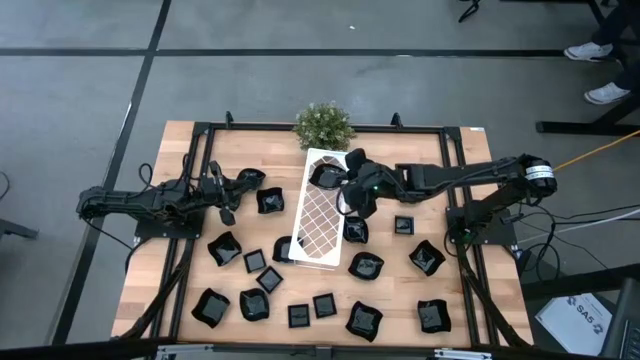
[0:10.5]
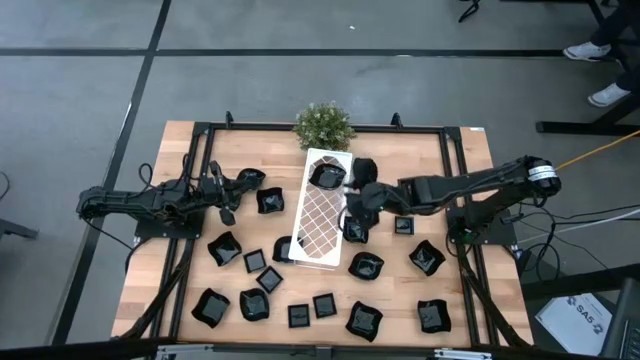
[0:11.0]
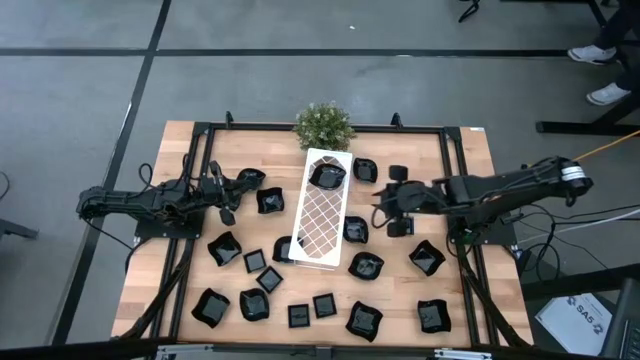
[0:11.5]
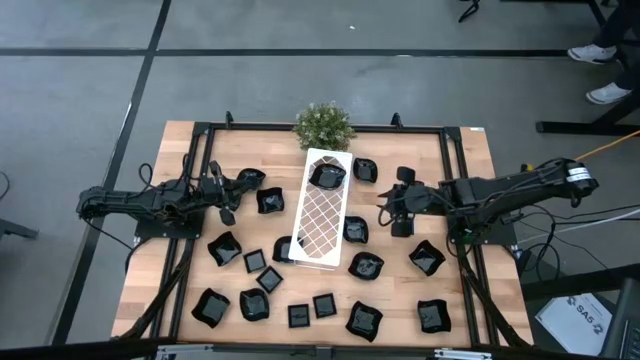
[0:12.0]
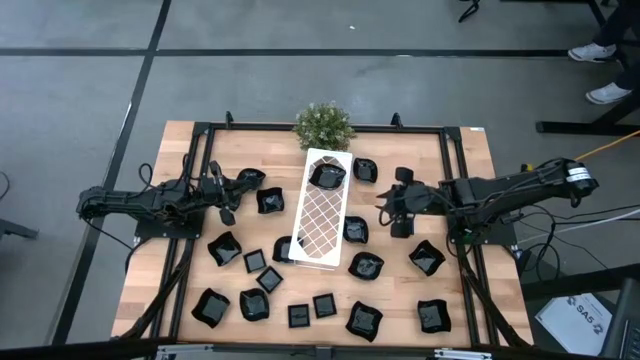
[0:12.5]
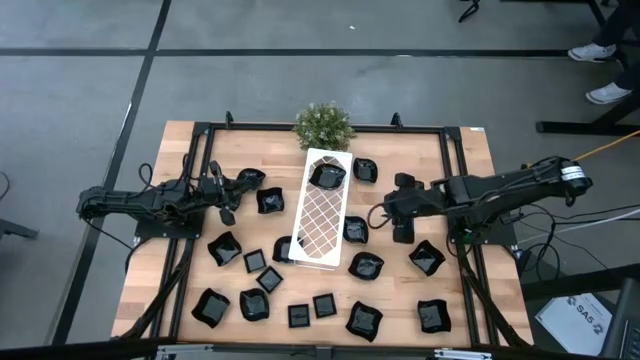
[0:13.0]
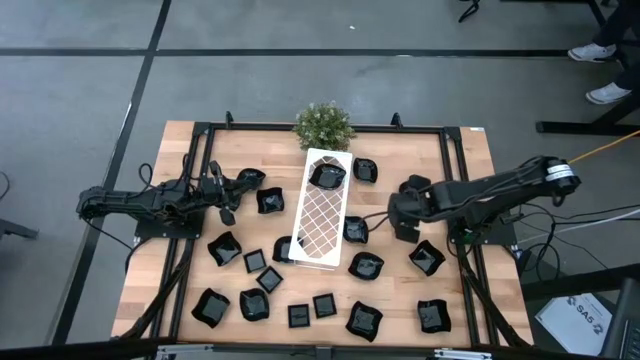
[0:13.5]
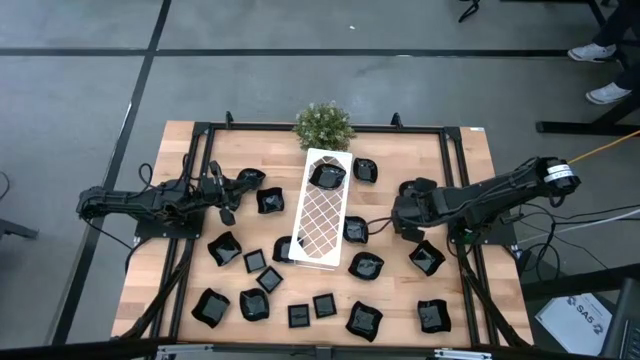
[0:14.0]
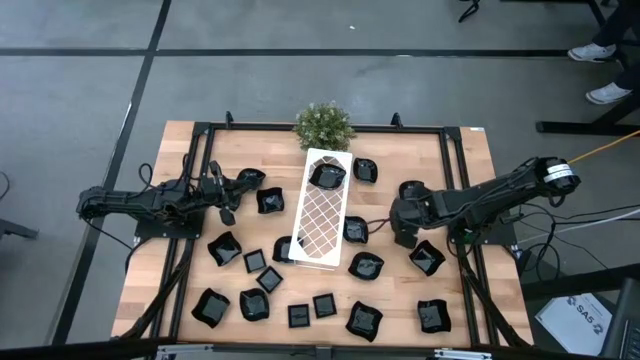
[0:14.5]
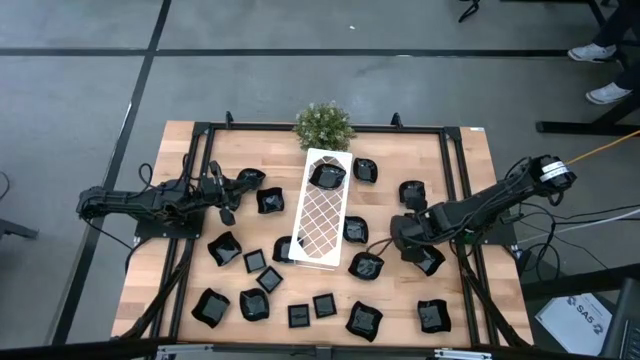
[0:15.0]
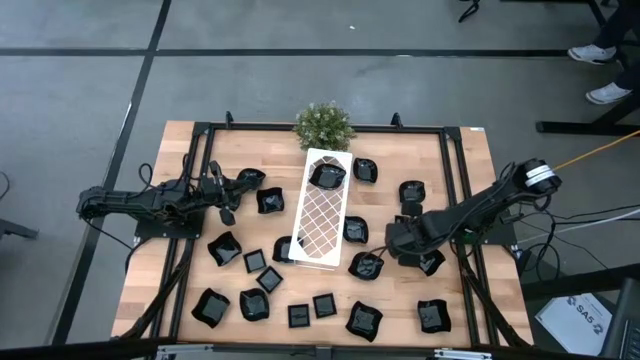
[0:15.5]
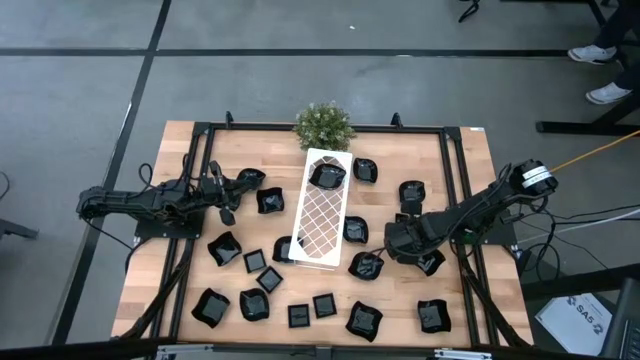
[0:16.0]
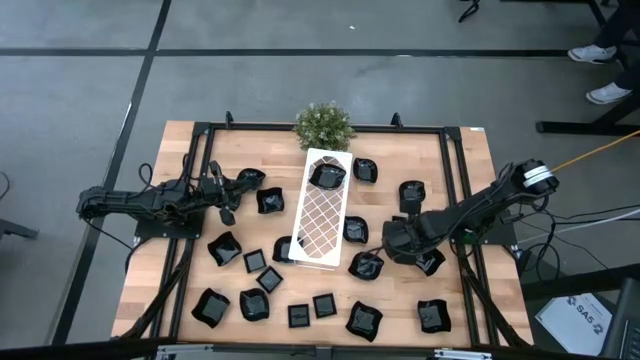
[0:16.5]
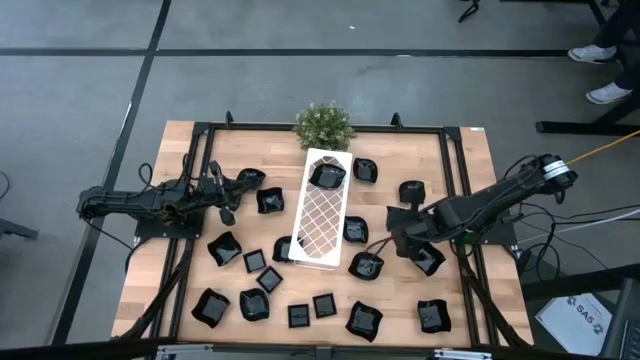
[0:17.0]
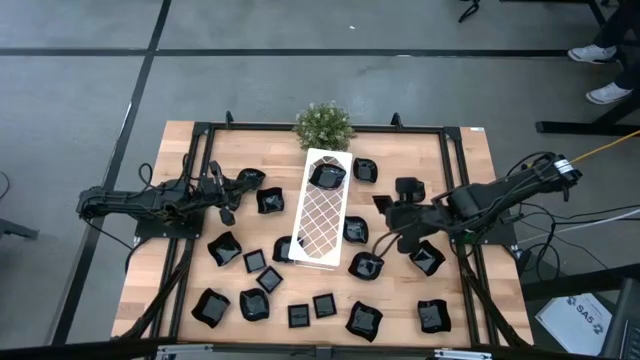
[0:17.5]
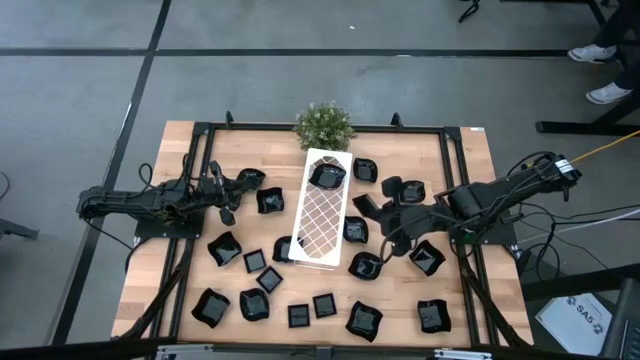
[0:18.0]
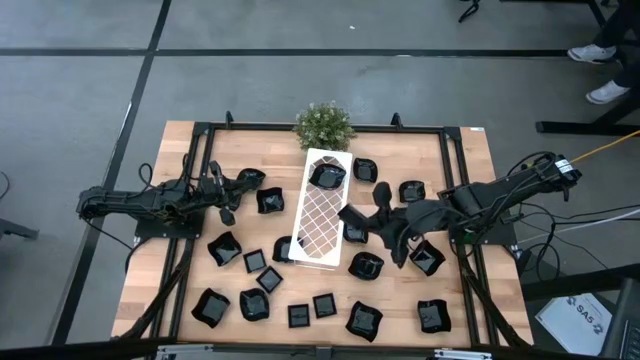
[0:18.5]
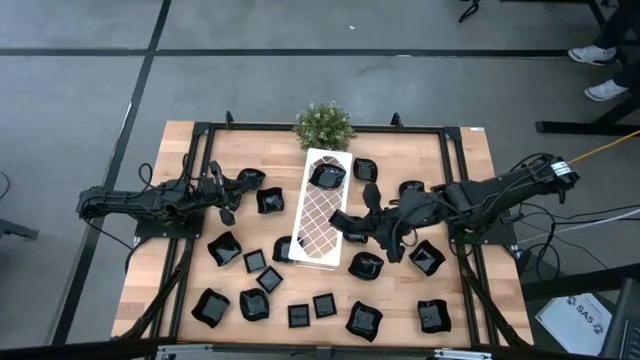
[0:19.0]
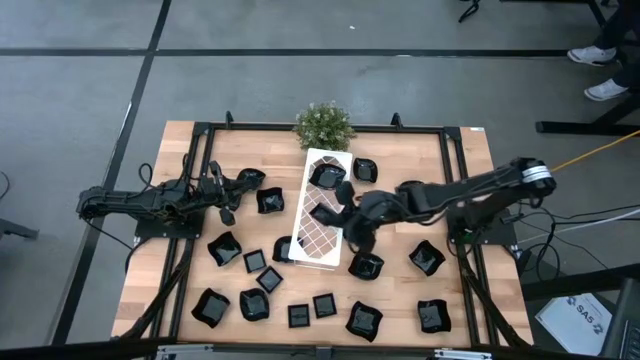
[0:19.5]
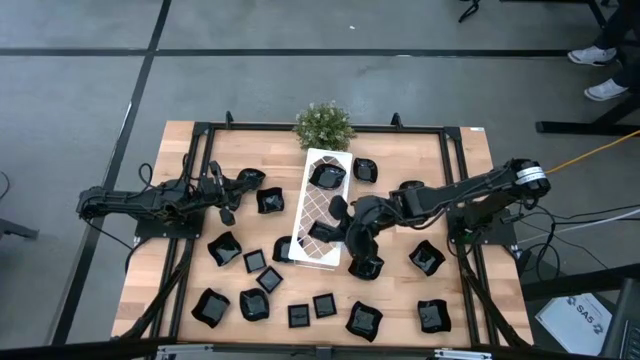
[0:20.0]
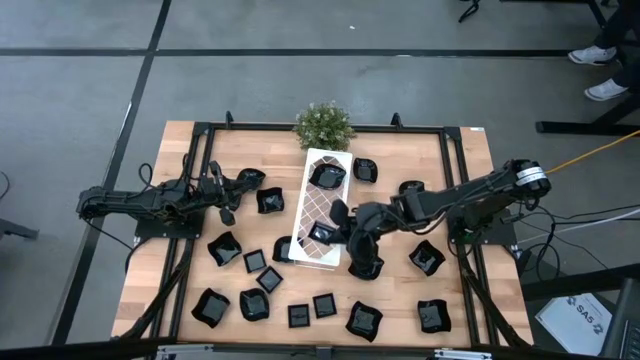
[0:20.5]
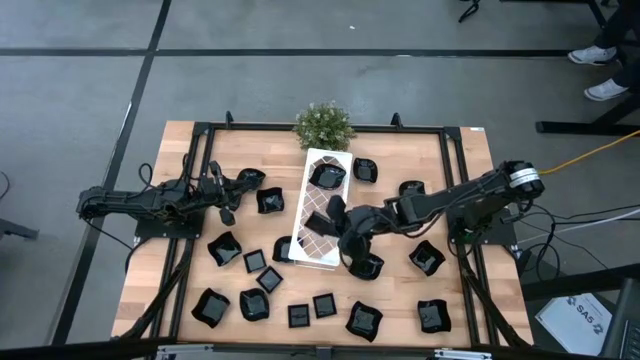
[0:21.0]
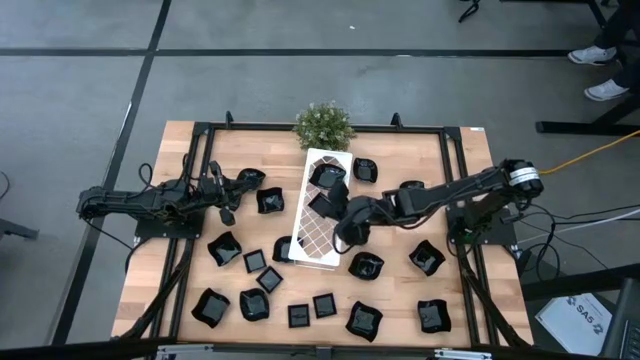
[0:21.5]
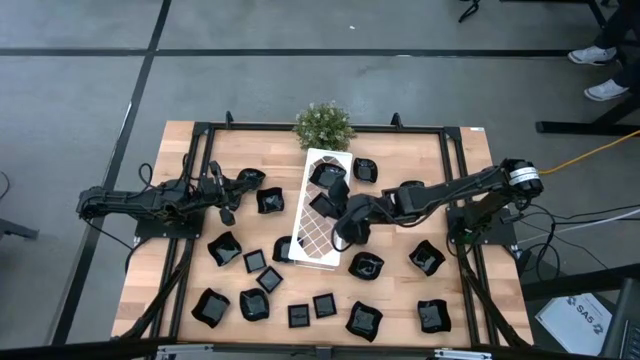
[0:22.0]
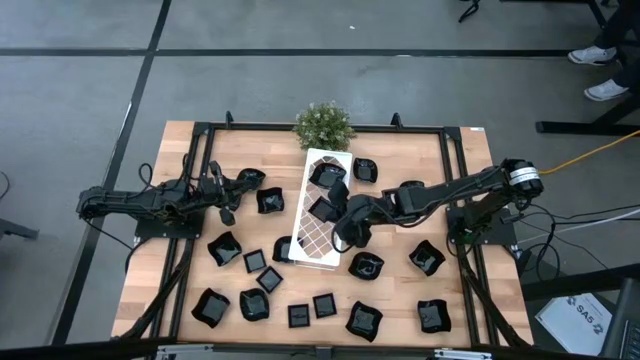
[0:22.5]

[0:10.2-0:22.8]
Task: Pick & Place Mini shaped plates
Put the square plate on the shelf

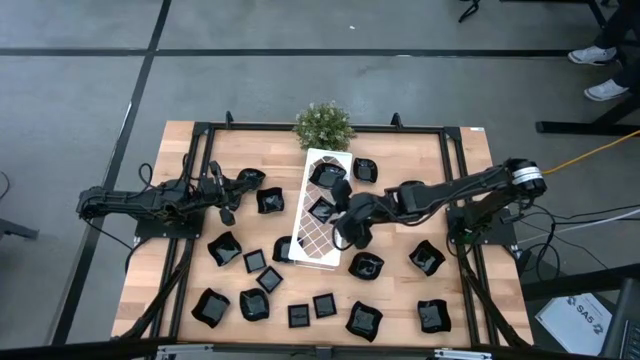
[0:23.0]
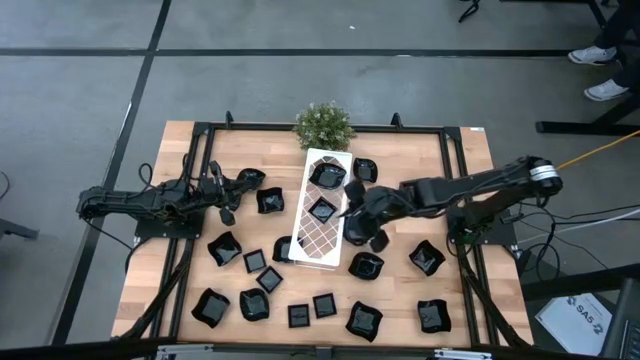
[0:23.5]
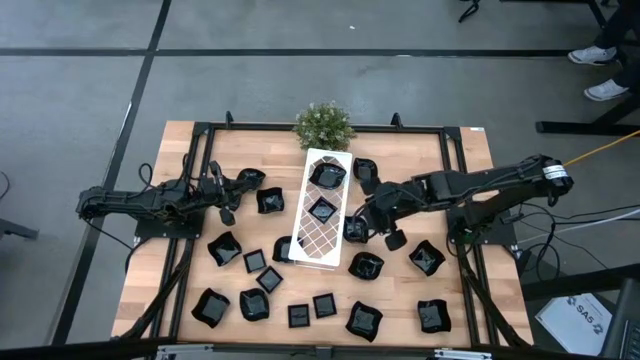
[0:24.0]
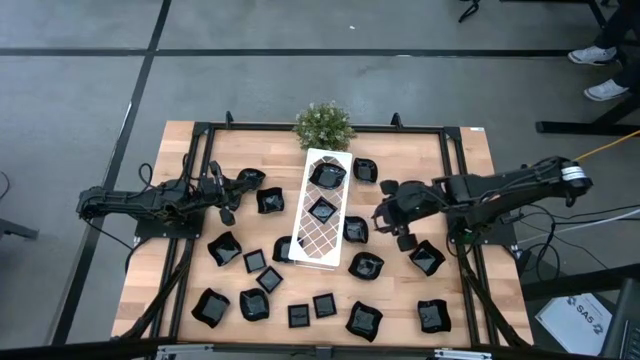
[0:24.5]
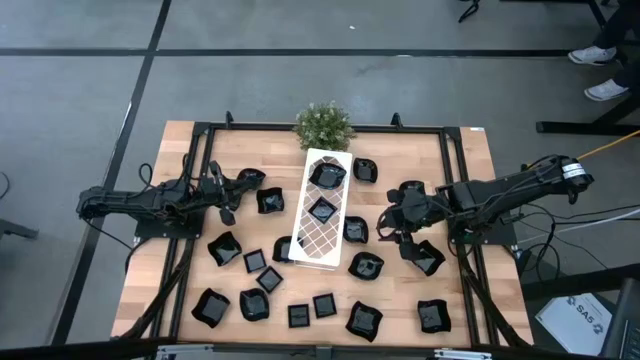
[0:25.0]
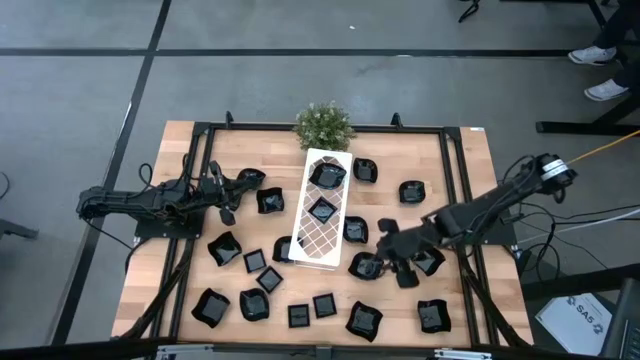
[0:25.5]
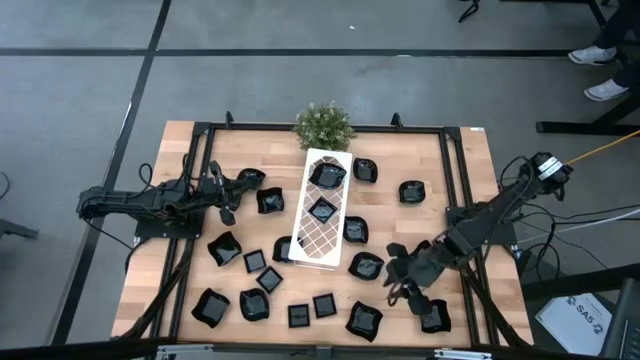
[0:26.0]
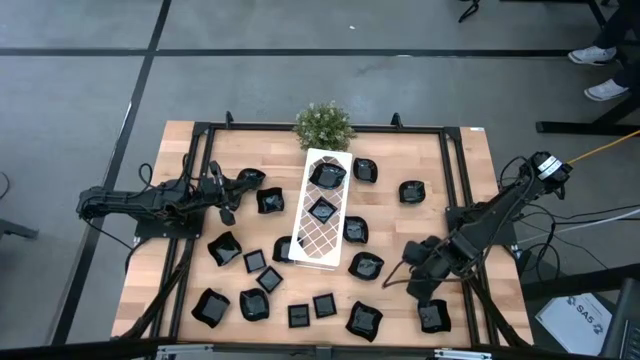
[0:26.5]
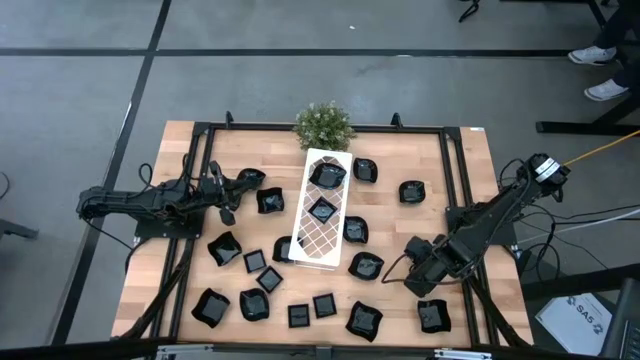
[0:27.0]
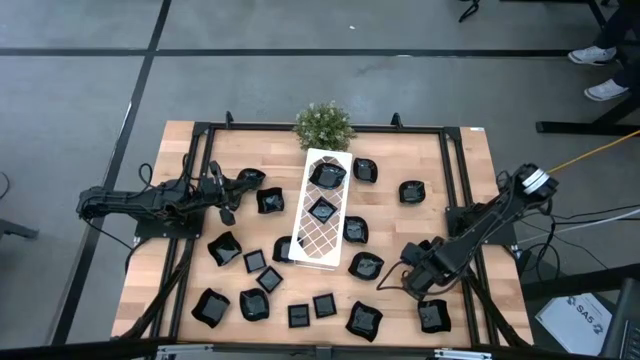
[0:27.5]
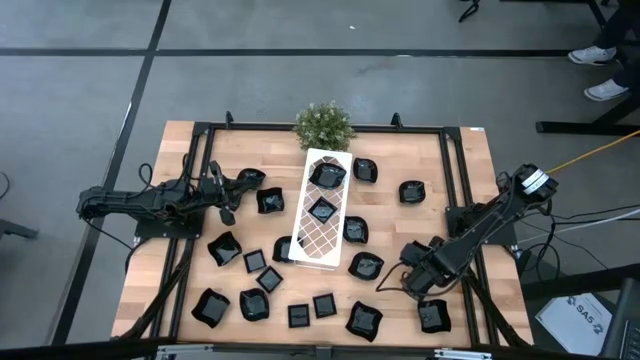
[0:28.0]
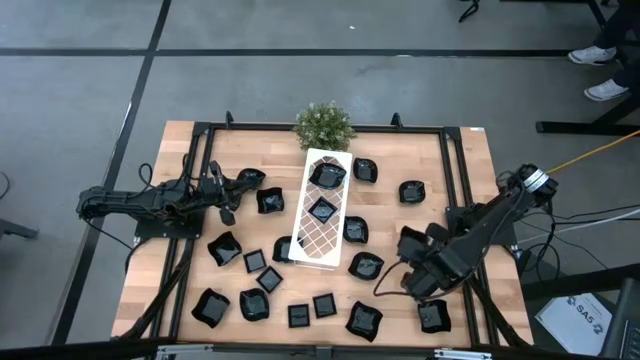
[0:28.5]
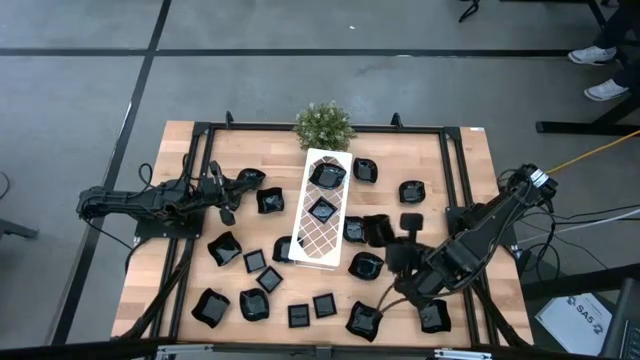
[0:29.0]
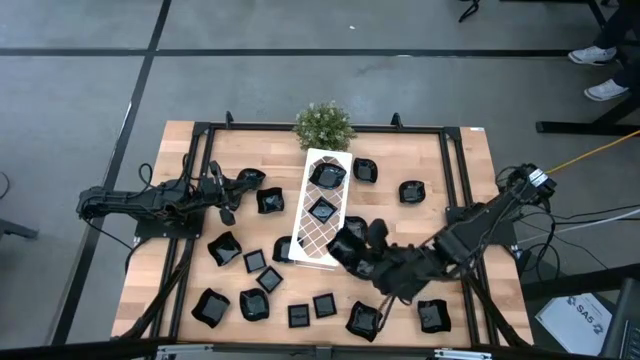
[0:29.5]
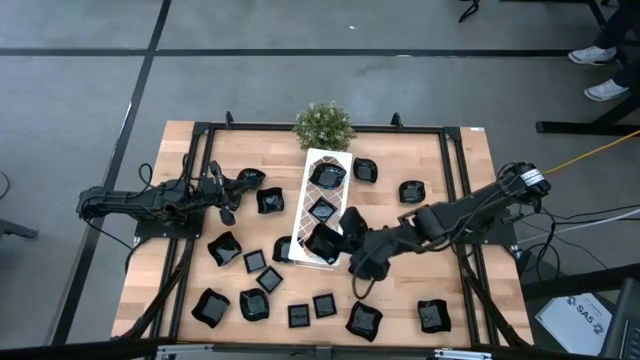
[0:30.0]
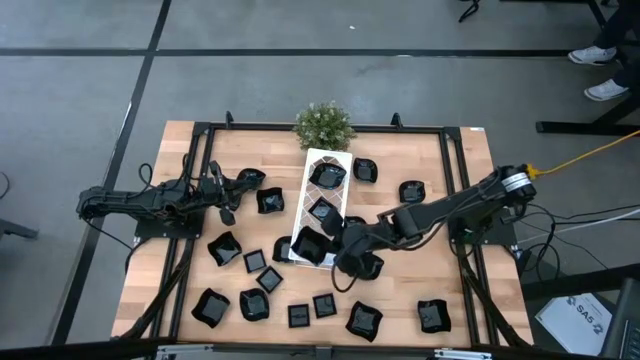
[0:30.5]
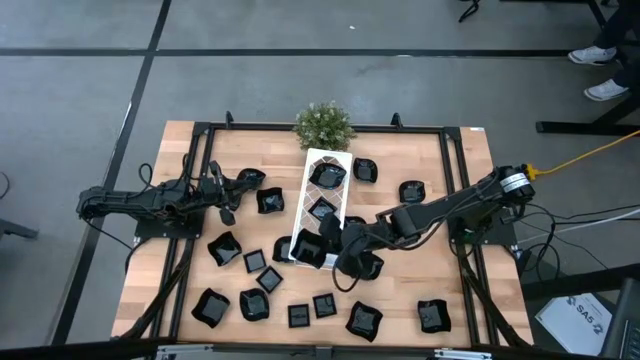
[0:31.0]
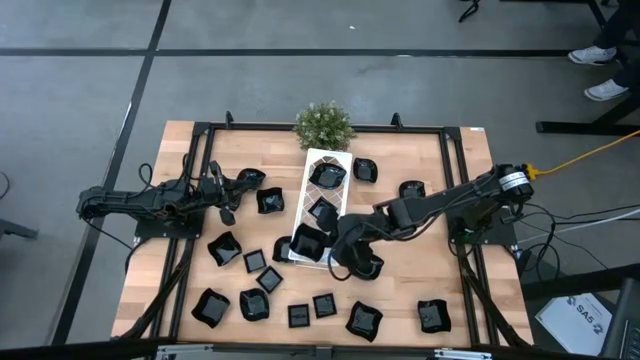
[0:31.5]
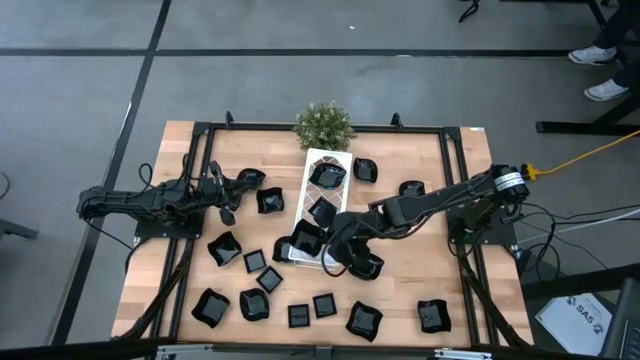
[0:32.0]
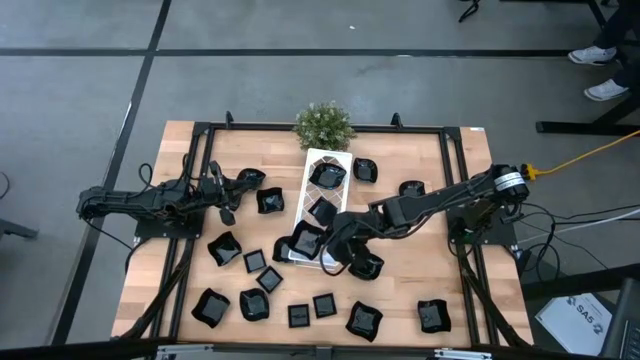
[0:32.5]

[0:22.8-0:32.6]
Put the distorted square plate on the shelf
